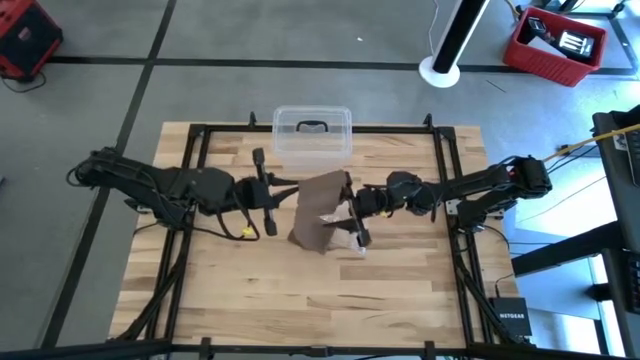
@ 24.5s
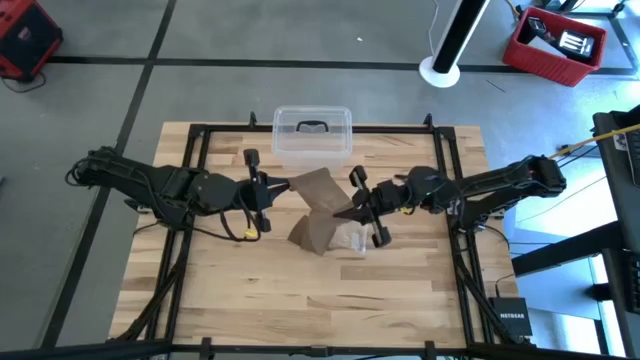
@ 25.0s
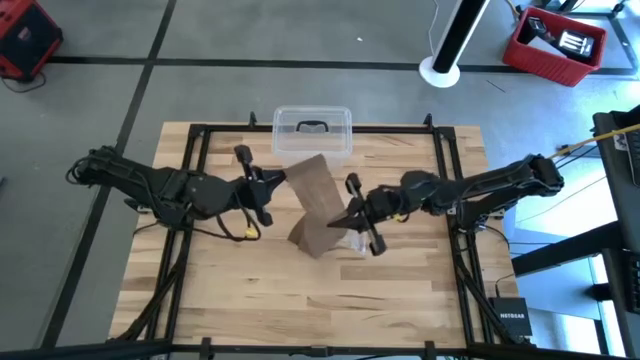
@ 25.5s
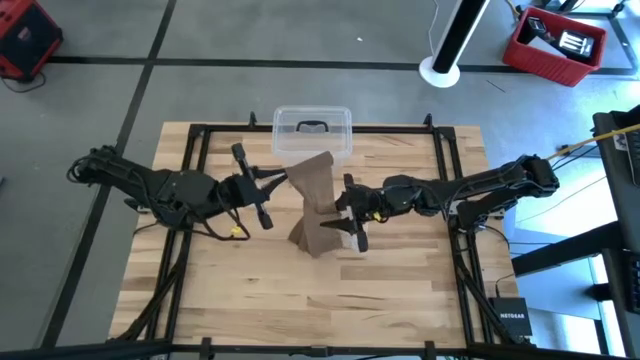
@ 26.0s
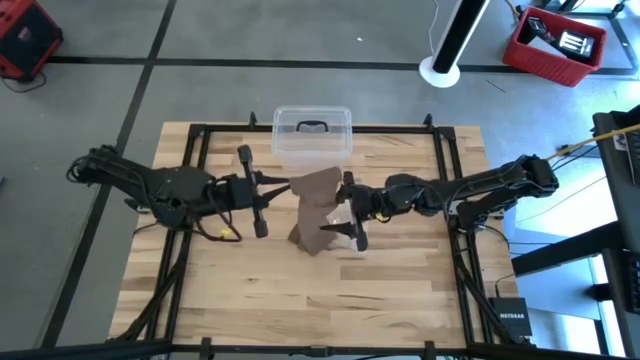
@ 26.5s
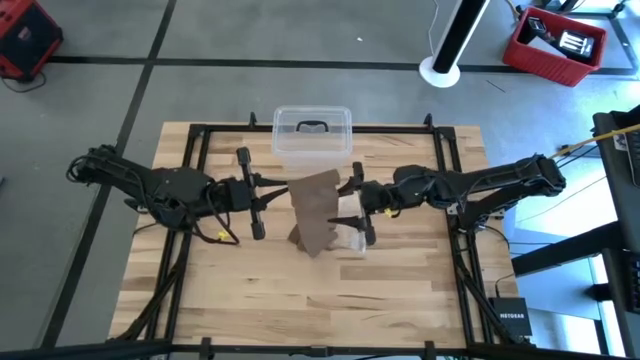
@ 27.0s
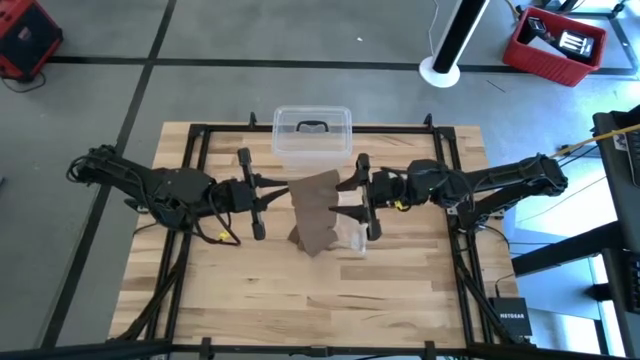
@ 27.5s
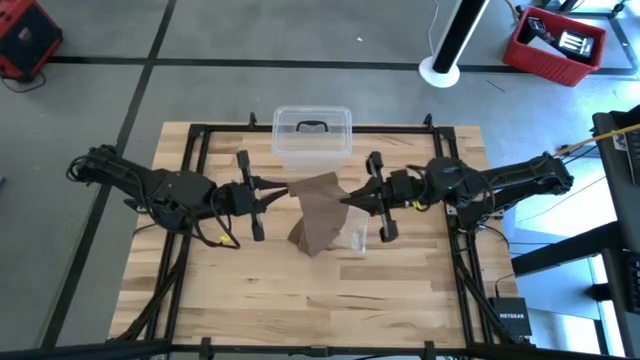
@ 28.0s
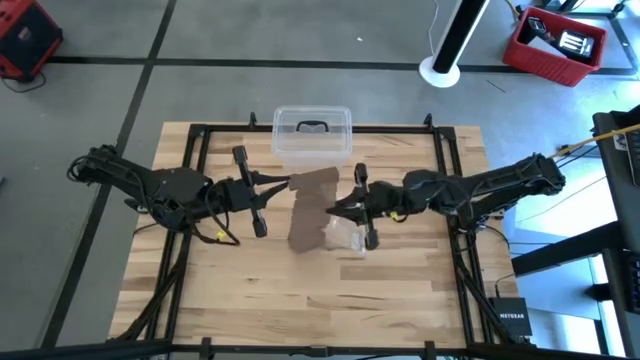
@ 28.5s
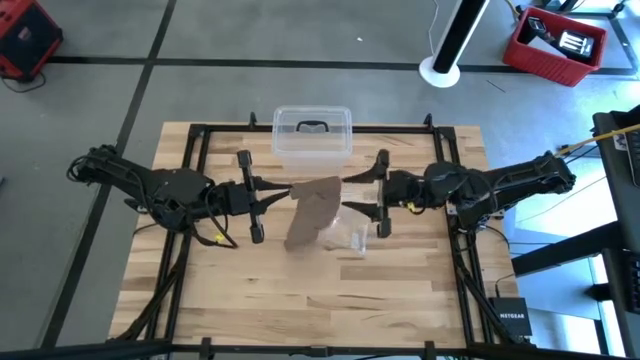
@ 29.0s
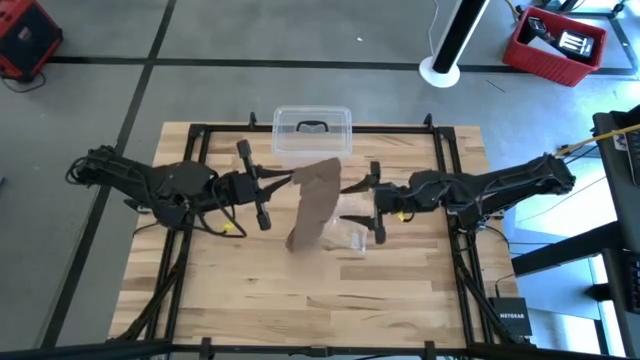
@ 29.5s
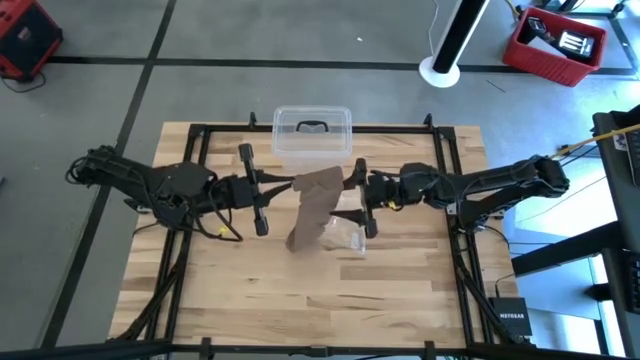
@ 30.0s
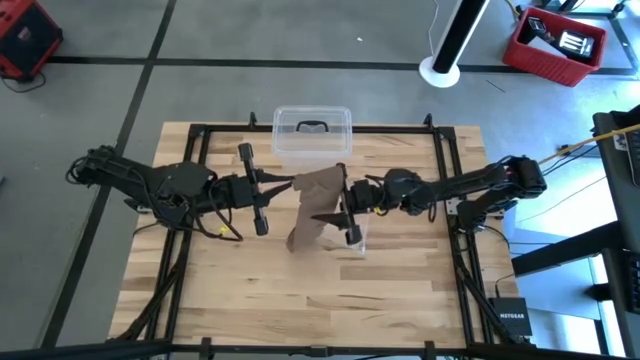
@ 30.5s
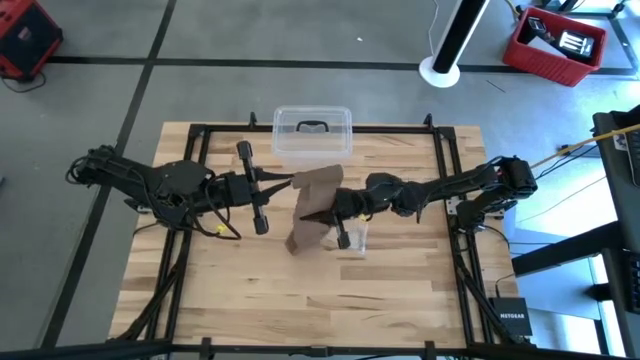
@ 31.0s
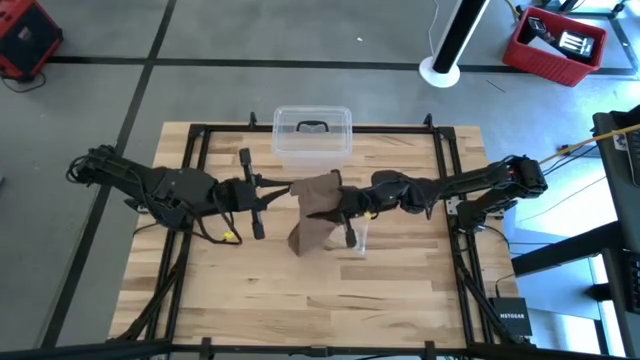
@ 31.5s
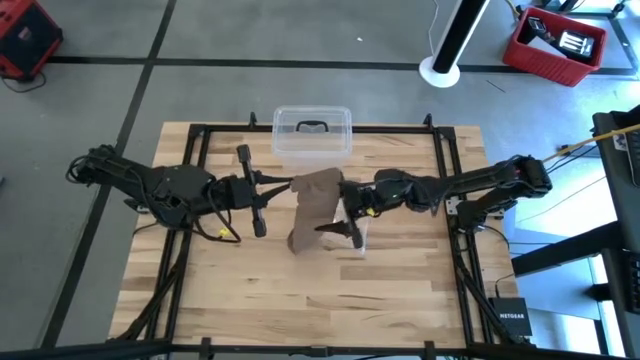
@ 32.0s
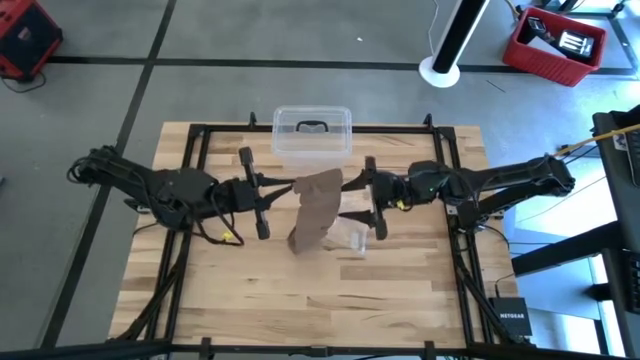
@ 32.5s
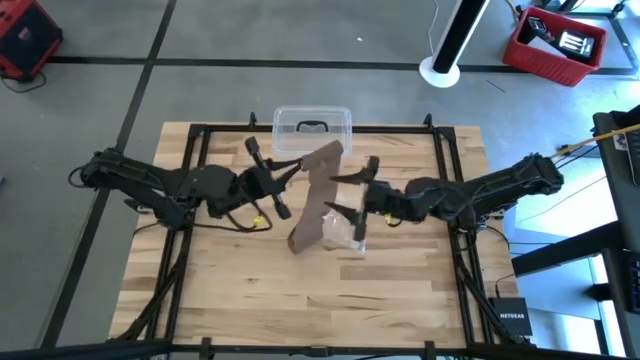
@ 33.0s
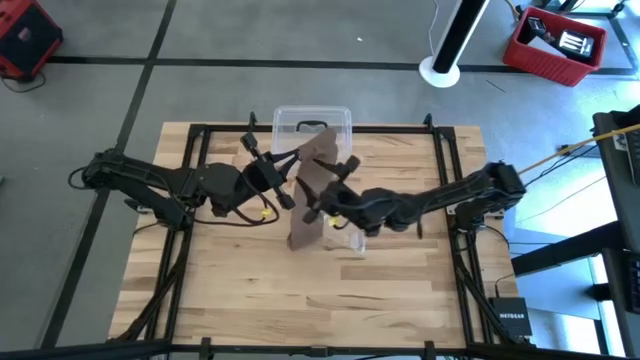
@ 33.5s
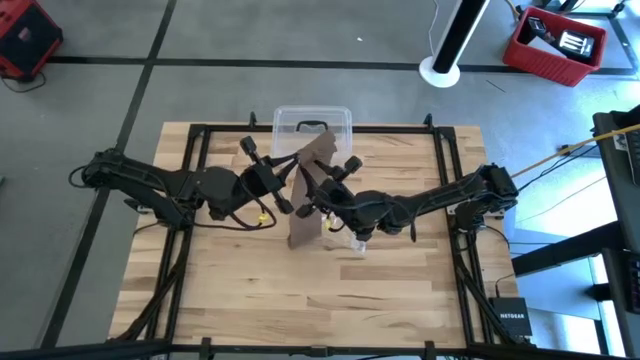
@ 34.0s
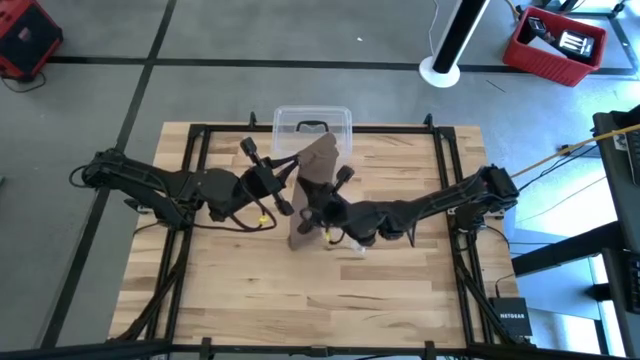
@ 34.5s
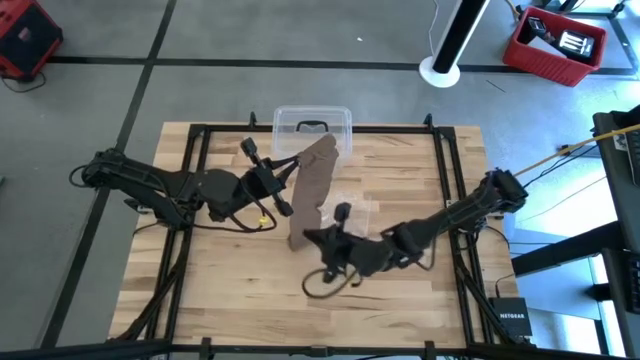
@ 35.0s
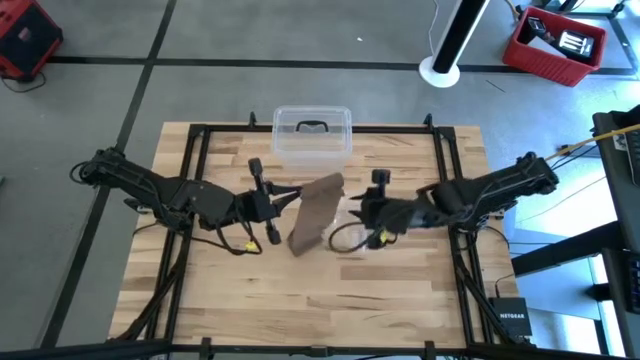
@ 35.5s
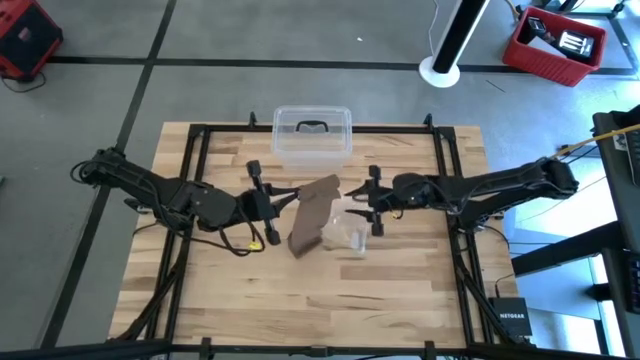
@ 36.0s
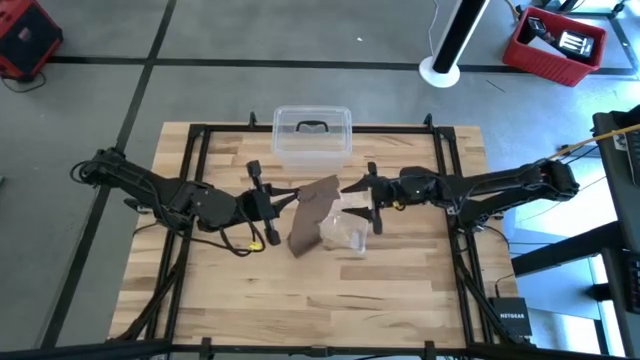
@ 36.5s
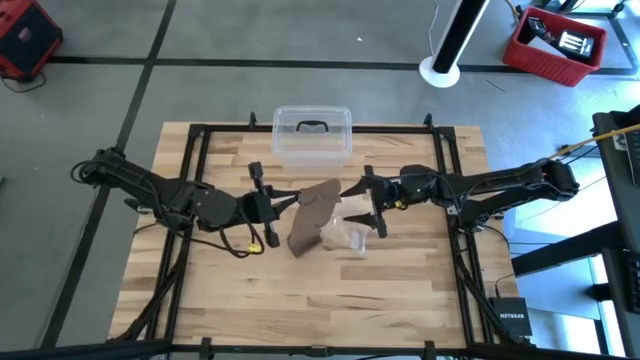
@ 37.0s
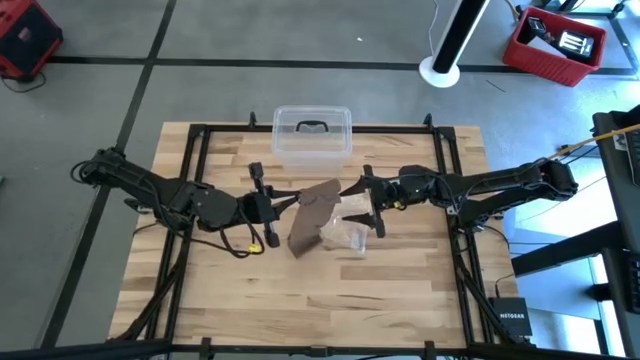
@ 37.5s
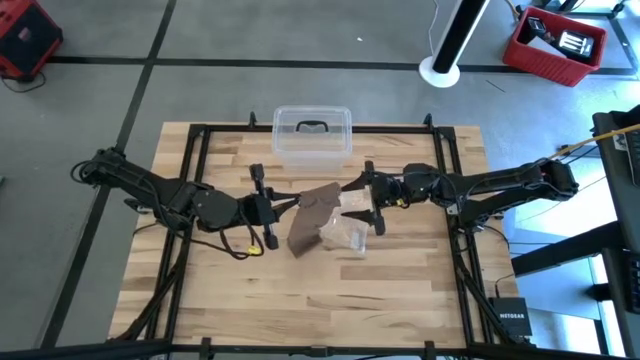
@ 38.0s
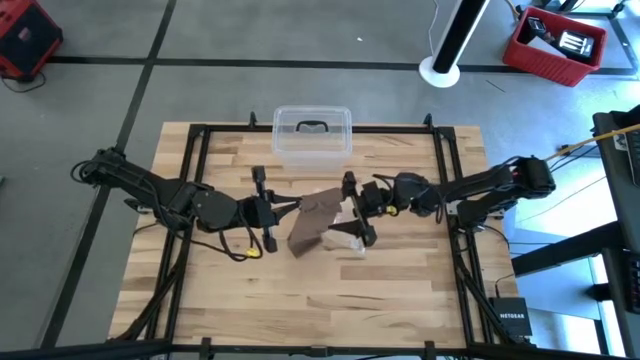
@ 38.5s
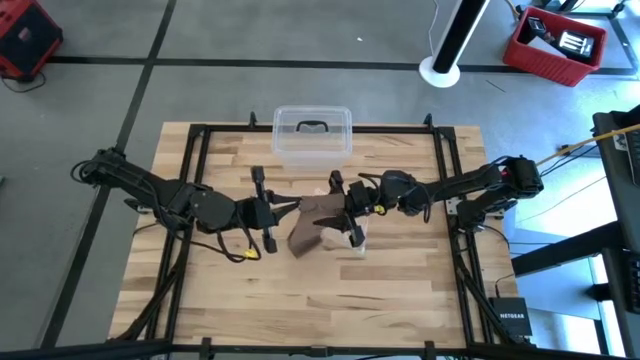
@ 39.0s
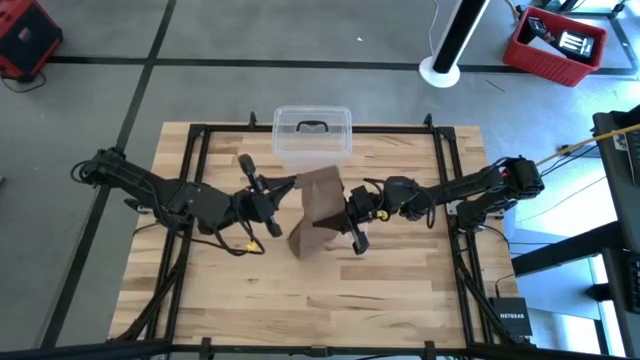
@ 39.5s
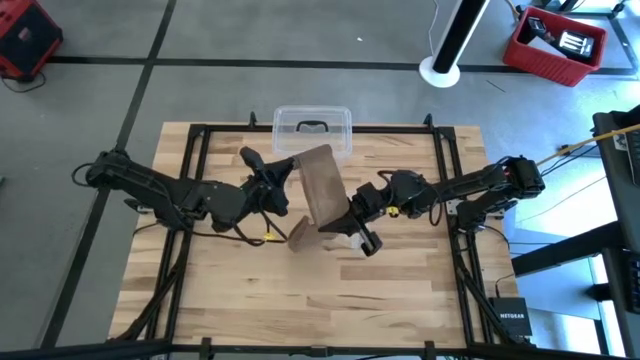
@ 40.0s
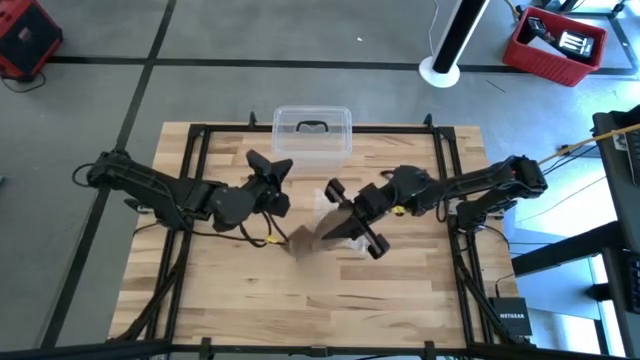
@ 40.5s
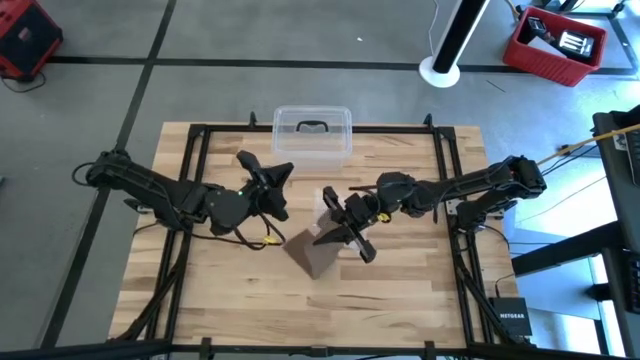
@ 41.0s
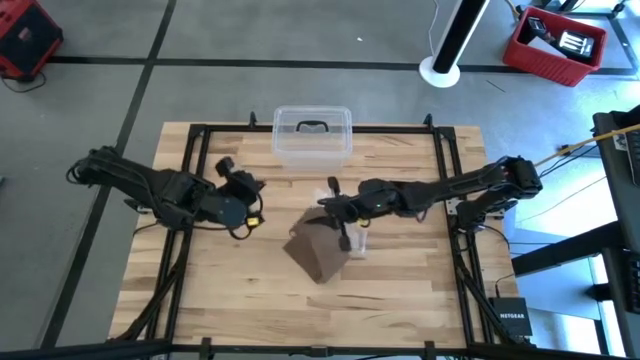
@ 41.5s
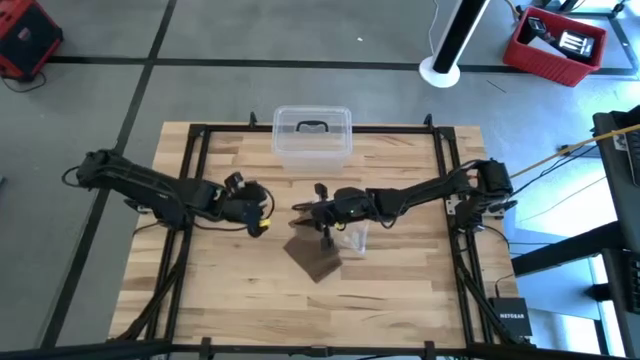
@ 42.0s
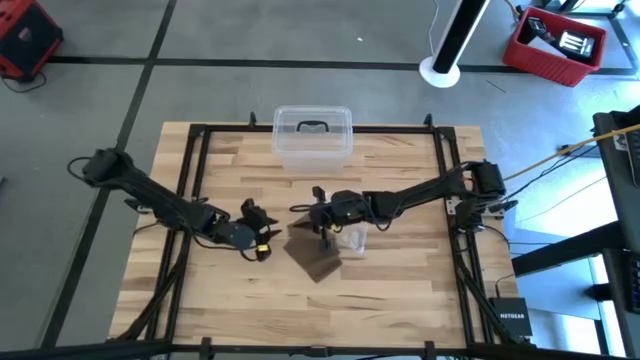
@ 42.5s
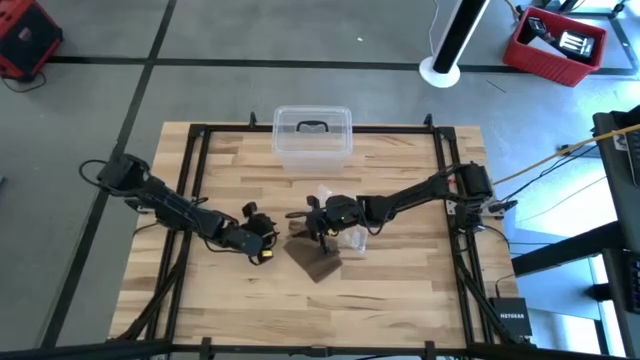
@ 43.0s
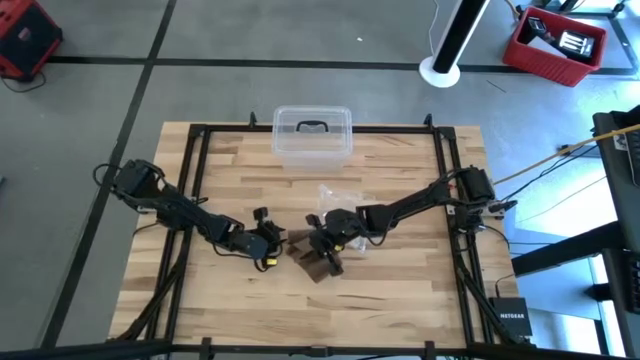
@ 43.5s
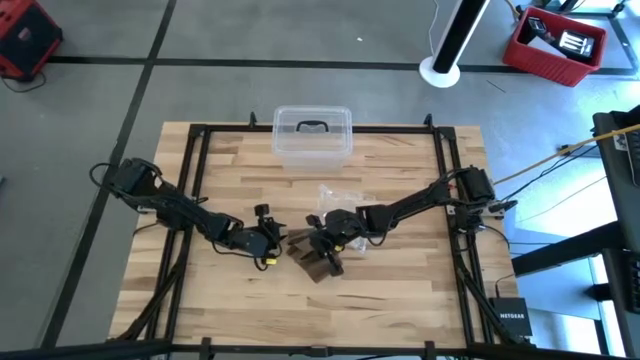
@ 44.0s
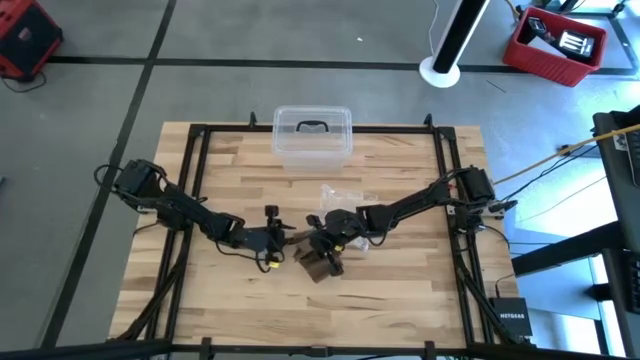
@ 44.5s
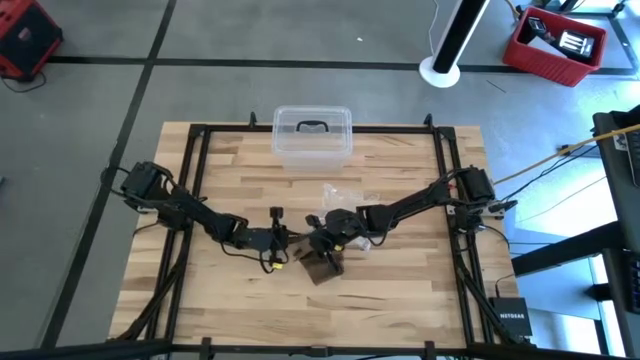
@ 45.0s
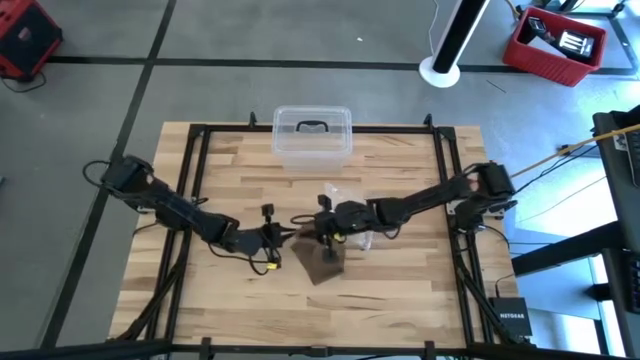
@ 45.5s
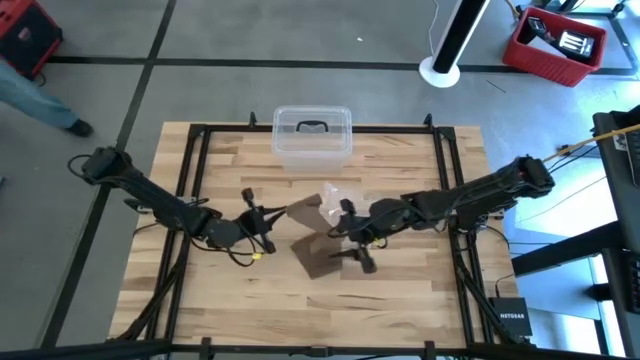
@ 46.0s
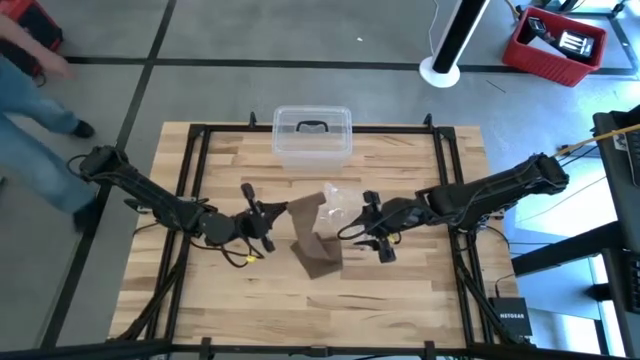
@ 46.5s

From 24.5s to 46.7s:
Task: Roll bandage
Roll the brown bandage
